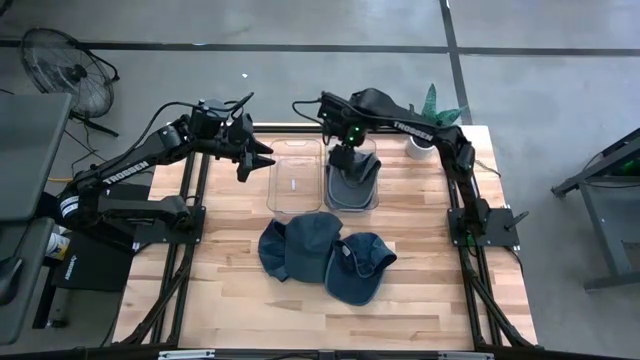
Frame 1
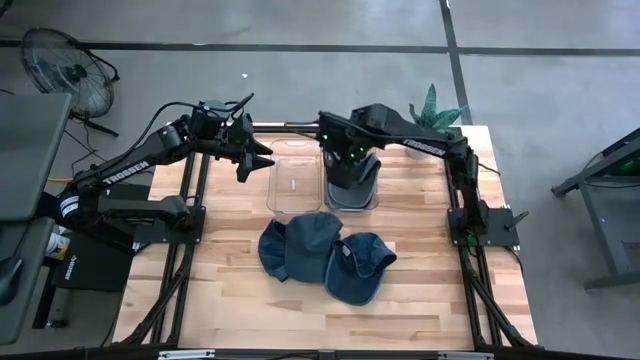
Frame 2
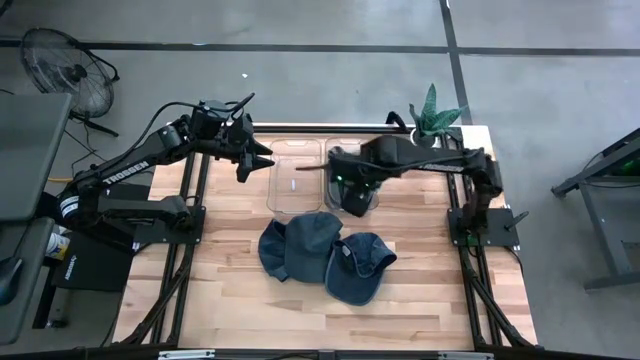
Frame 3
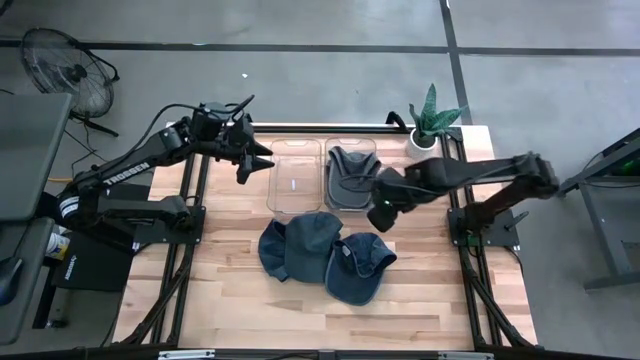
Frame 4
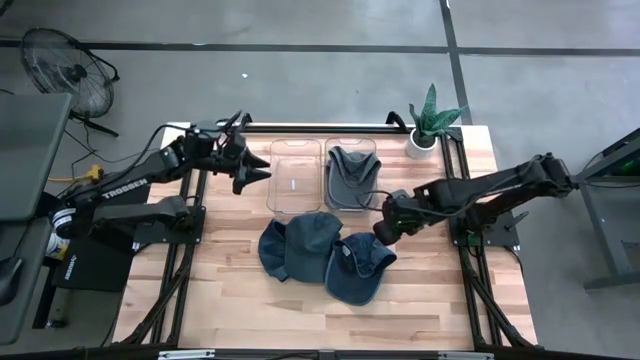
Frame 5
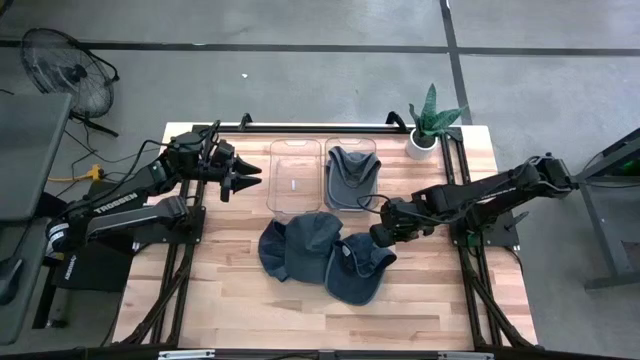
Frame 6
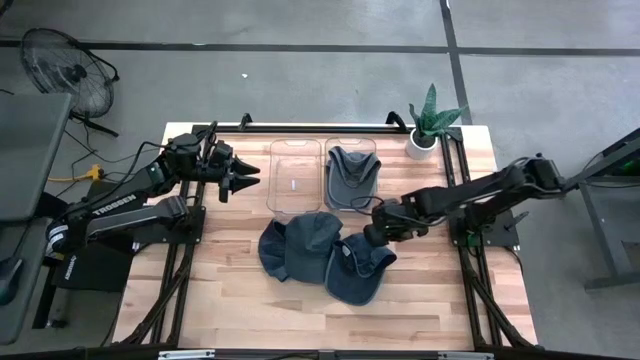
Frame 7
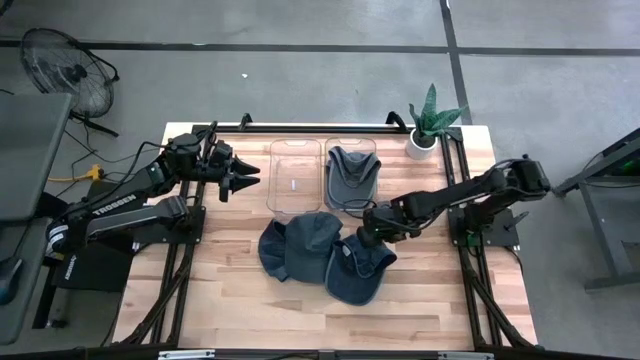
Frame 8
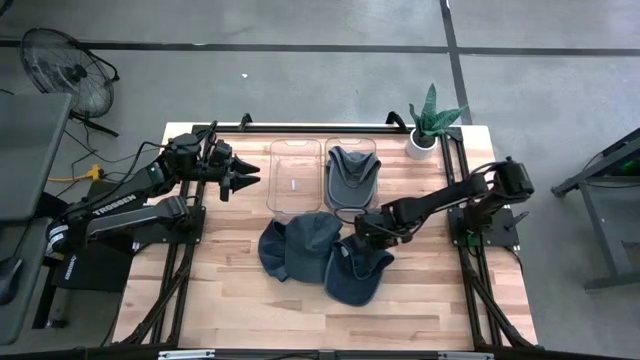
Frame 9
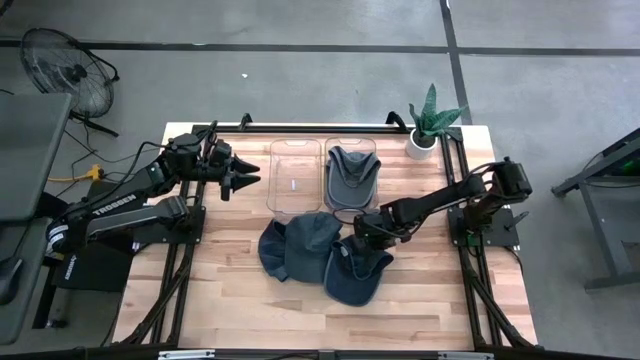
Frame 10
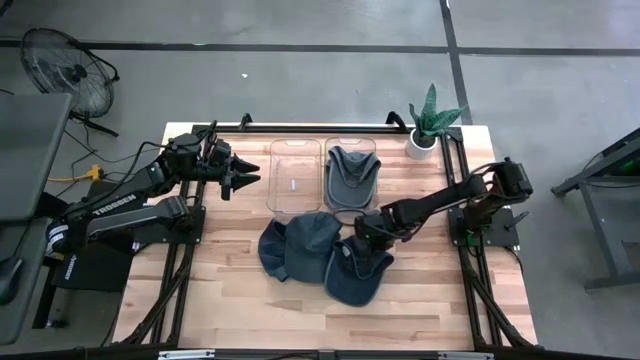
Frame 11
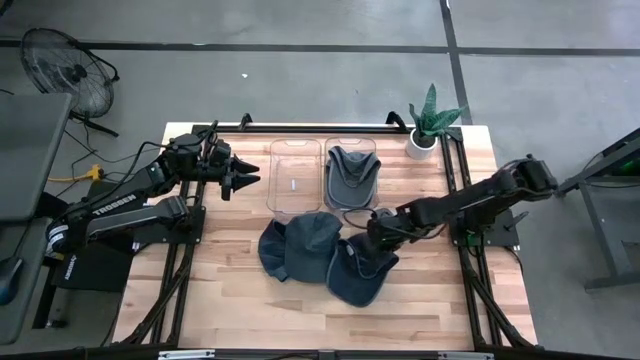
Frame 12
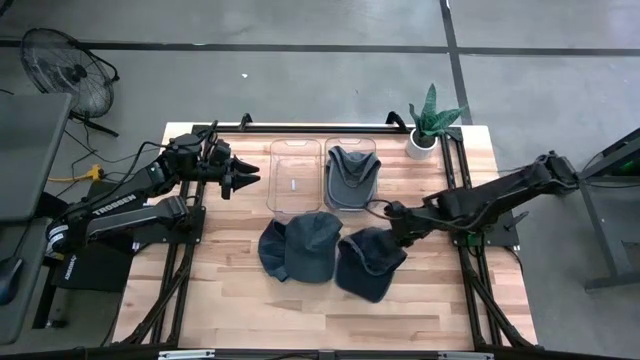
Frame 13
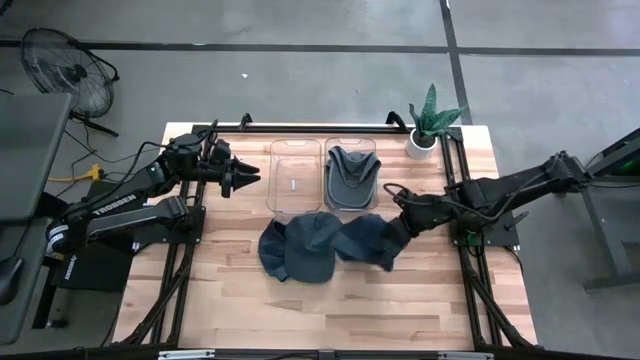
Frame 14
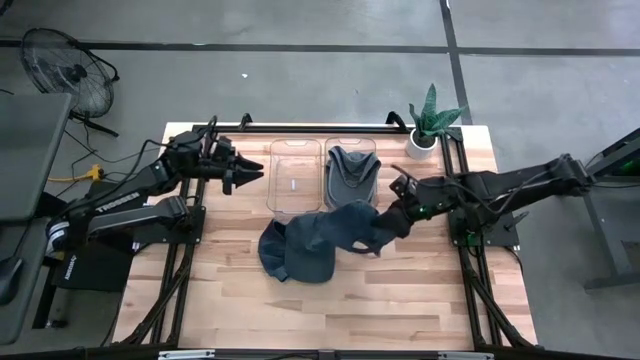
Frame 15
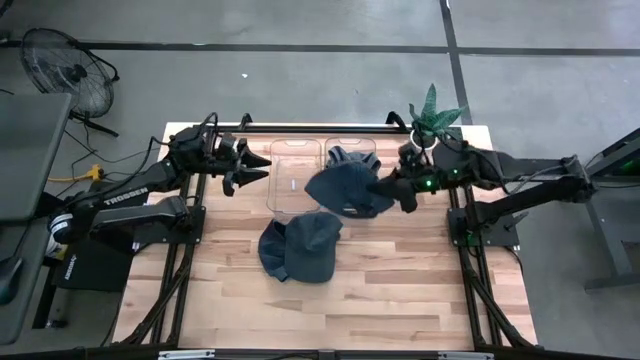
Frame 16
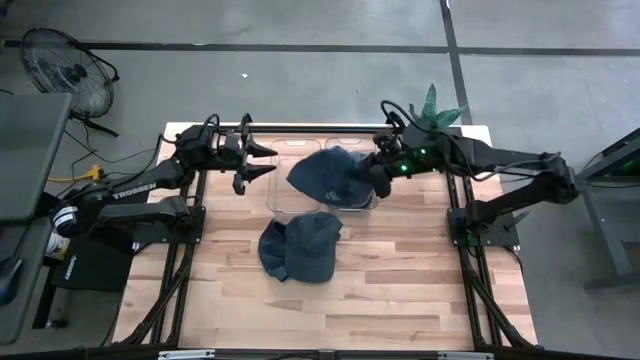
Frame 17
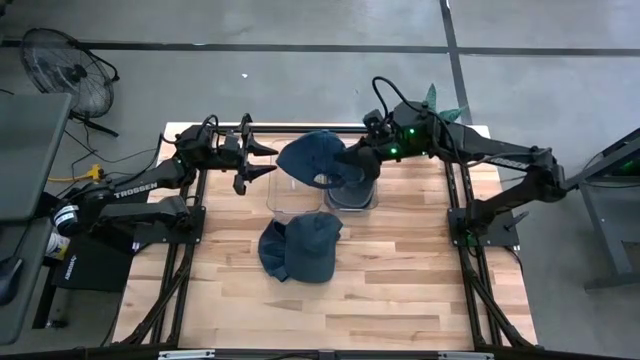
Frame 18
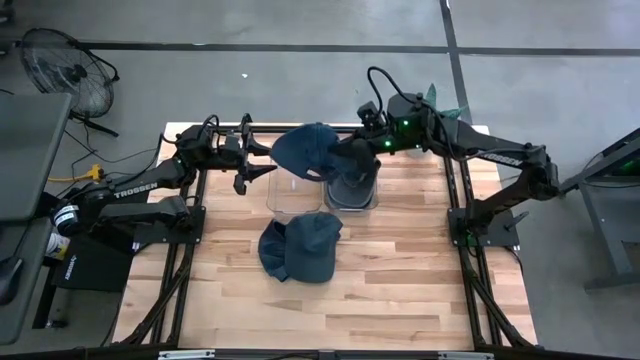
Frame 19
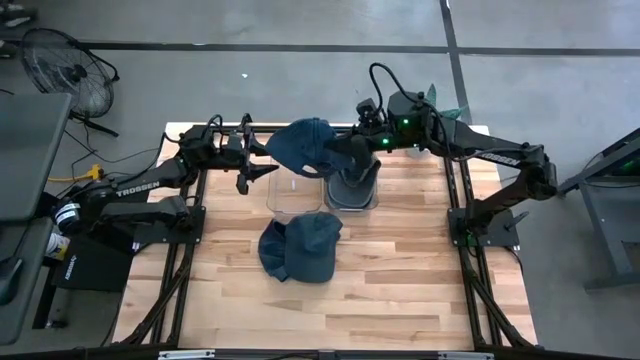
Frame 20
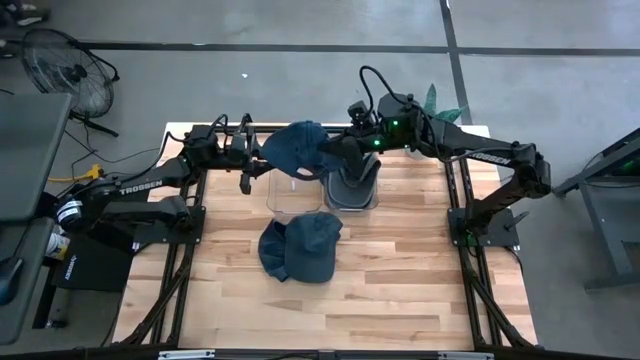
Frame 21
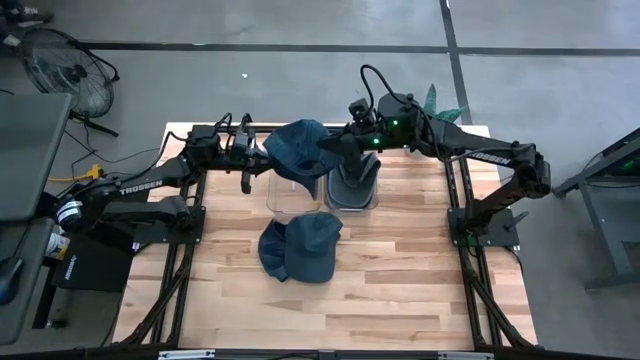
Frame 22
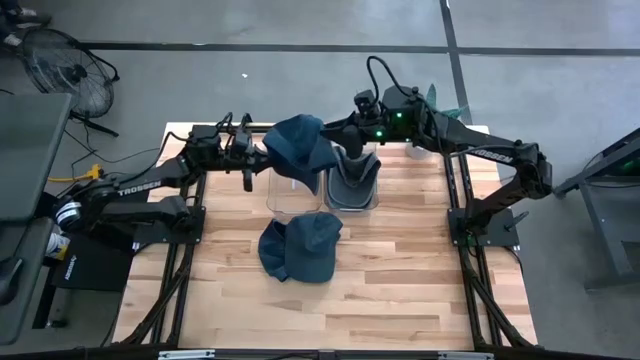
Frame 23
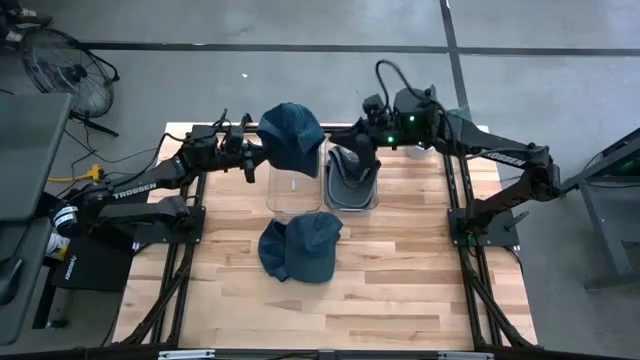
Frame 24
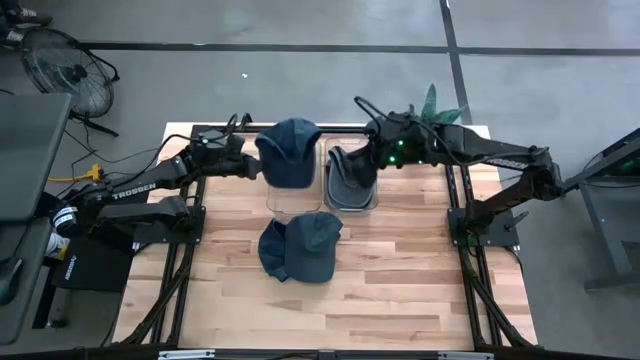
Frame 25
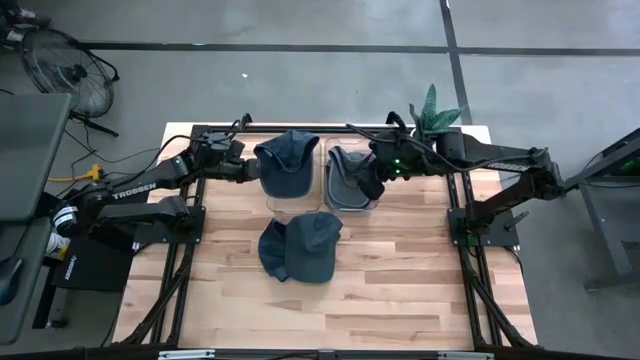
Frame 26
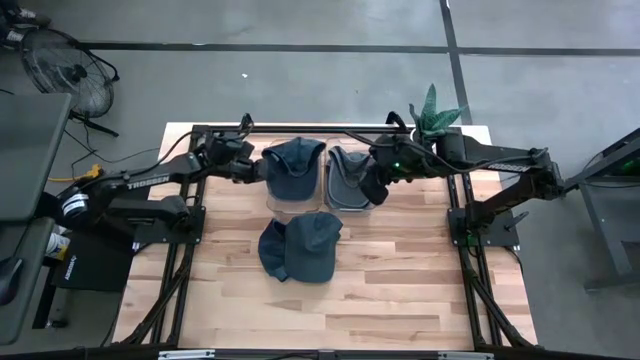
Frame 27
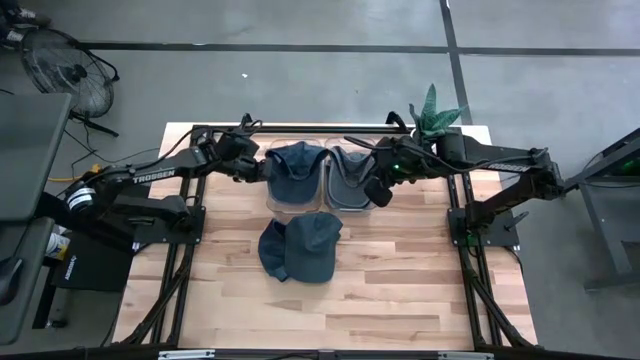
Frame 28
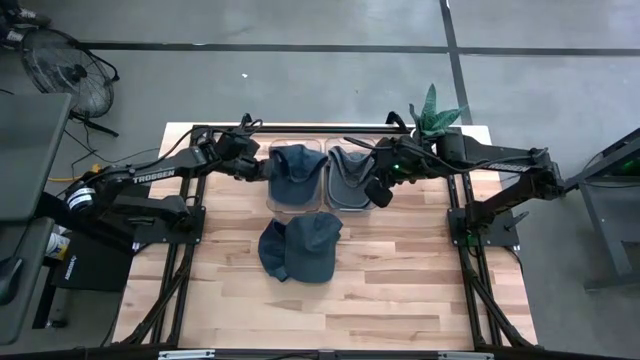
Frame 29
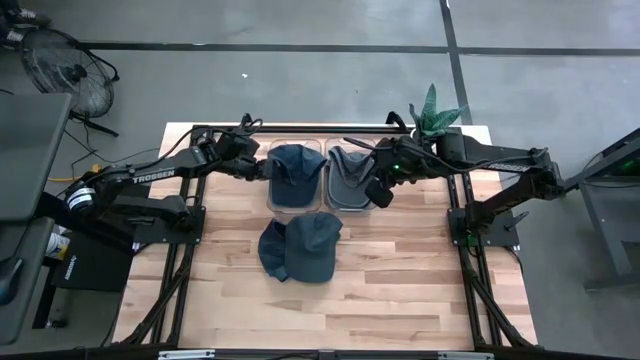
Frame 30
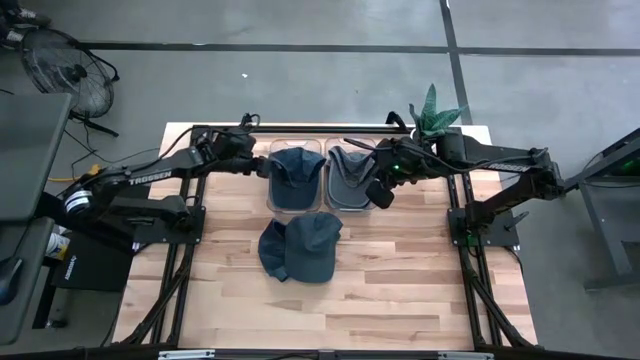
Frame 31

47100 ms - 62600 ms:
Task: Pick & Place hat
Put the right blue cap into the left transparent bin

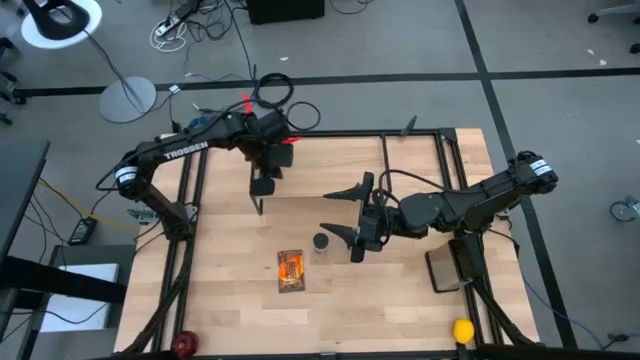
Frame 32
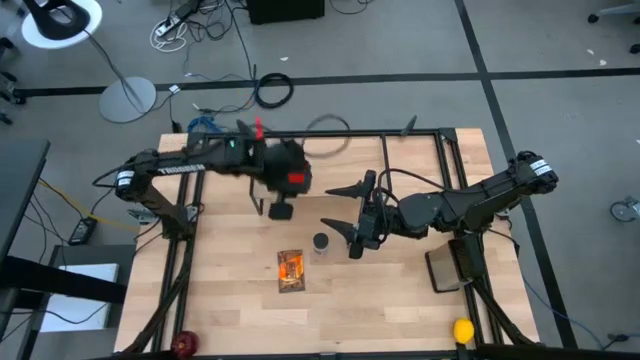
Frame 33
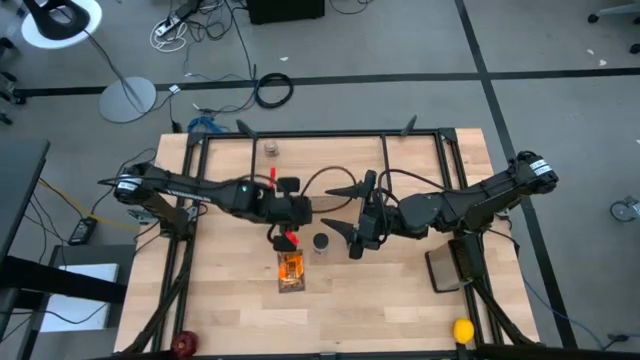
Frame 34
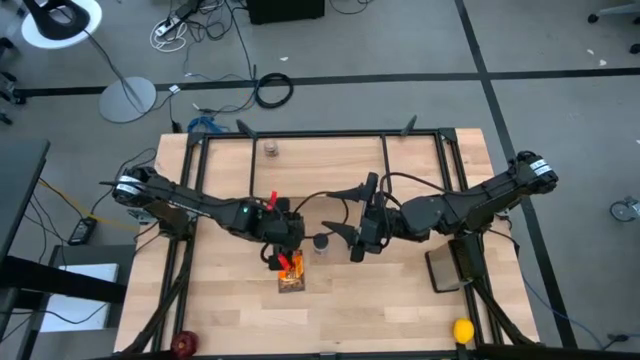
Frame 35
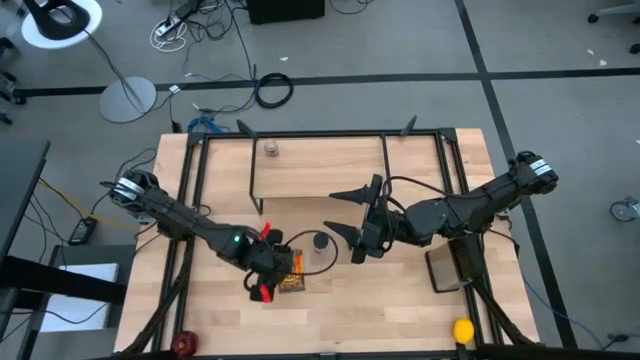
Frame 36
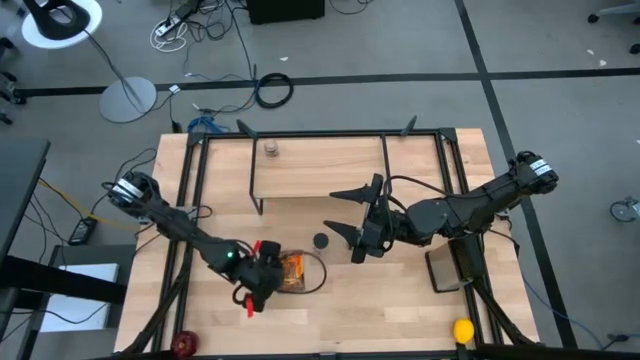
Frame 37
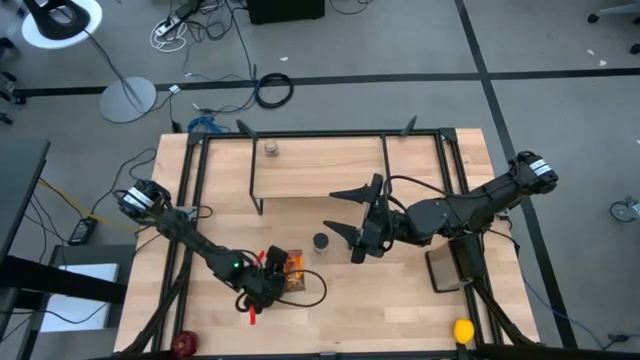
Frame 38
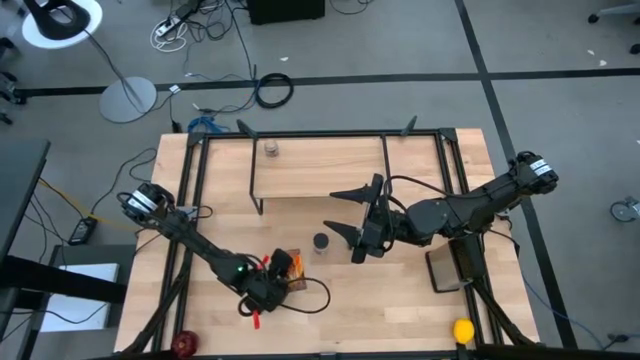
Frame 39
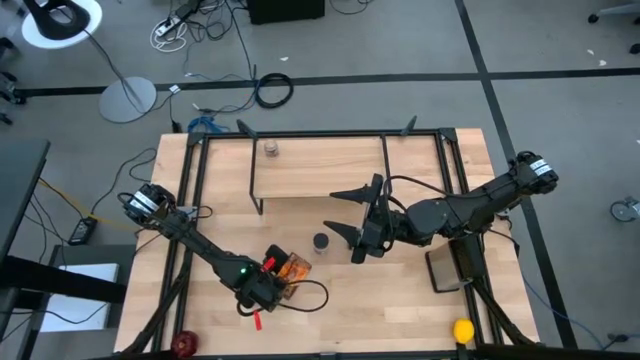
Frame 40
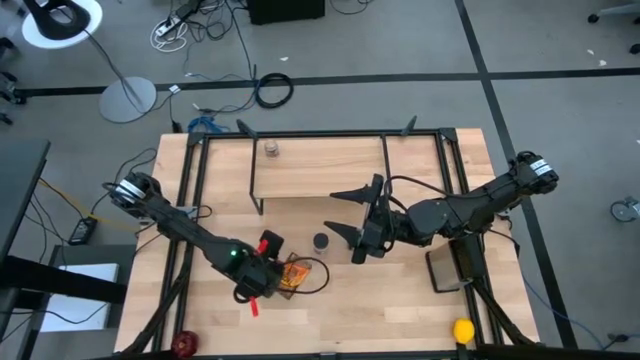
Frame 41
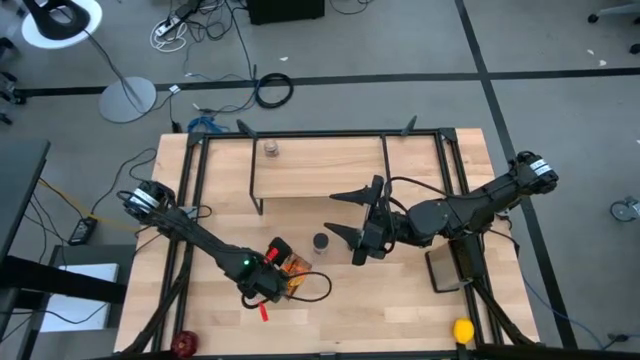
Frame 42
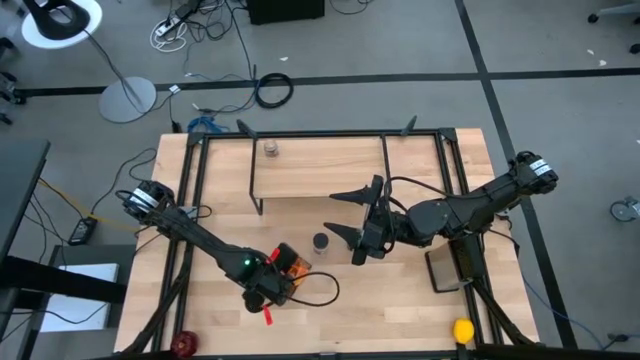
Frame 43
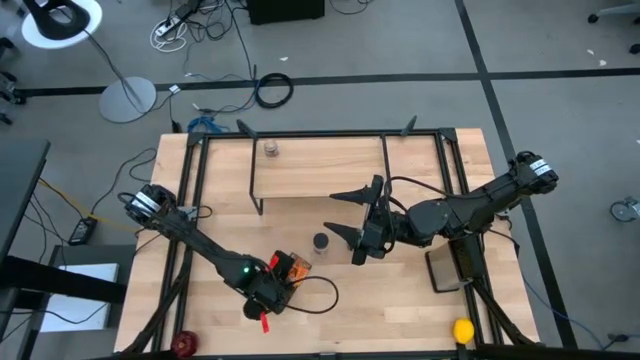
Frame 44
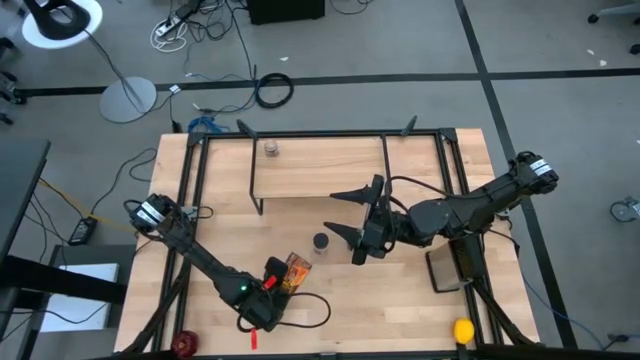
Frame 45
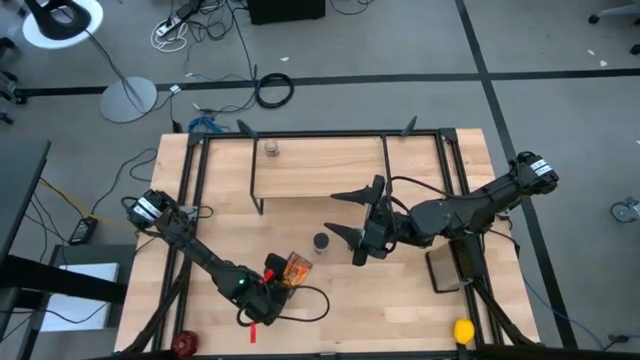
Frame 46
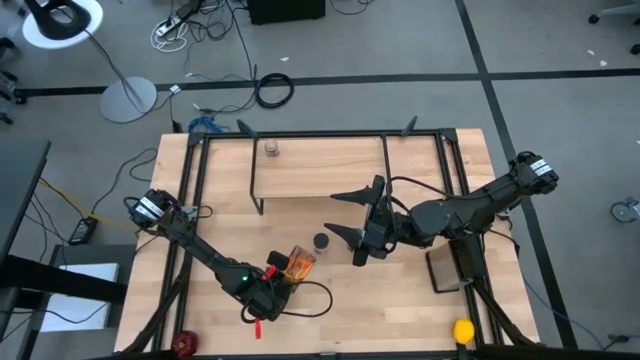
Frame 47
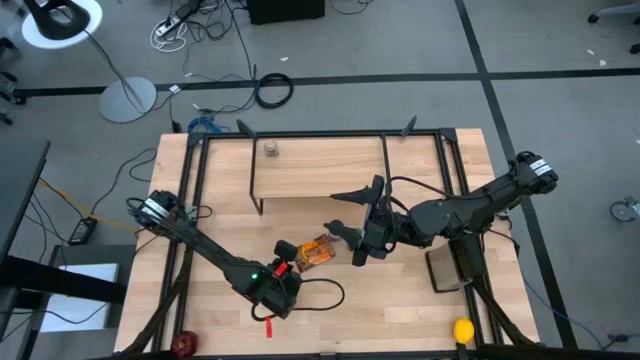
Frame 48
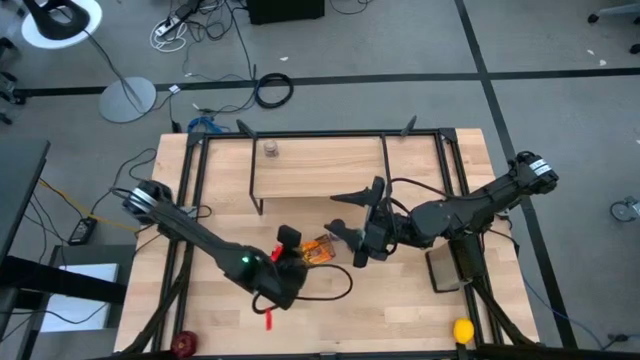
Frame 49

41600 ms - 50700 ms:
Task: Shelf spices
Put the brown seasoning pack on the shelf
